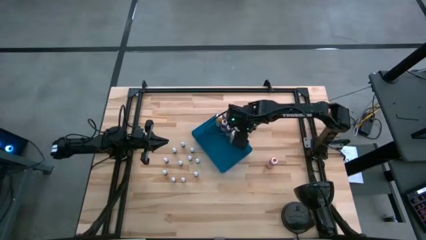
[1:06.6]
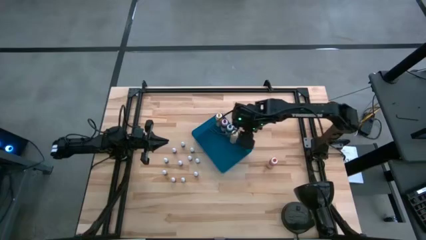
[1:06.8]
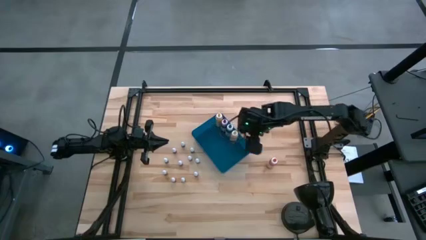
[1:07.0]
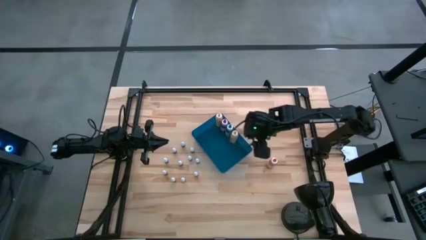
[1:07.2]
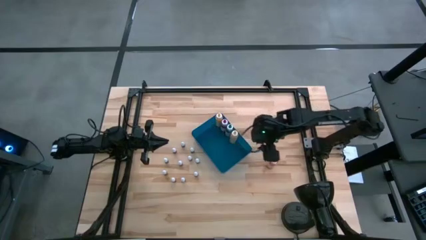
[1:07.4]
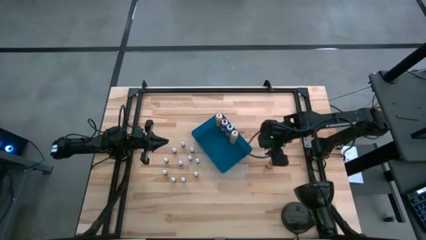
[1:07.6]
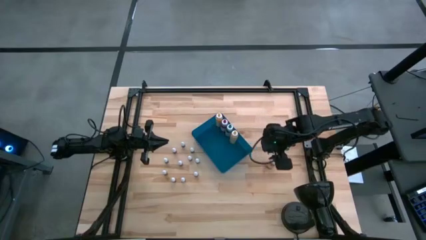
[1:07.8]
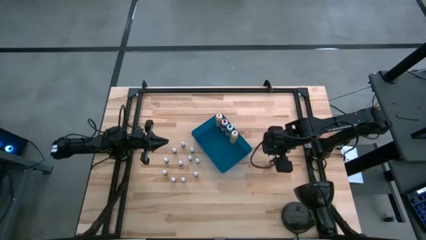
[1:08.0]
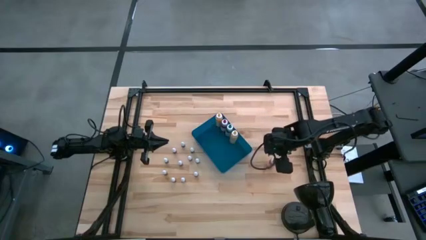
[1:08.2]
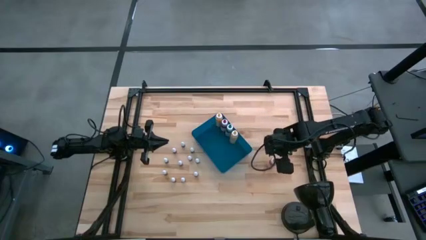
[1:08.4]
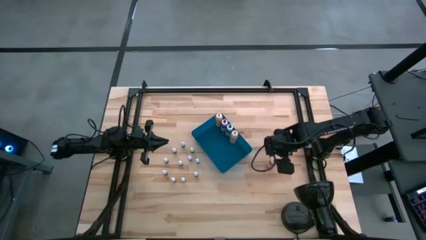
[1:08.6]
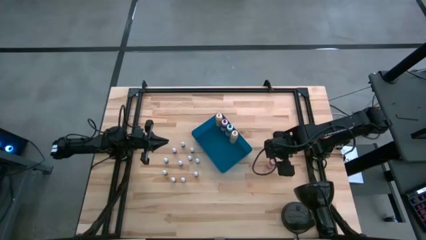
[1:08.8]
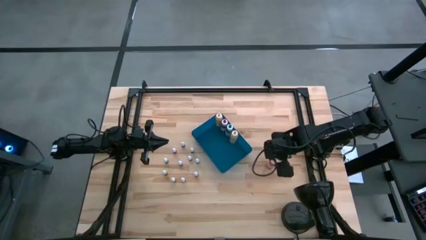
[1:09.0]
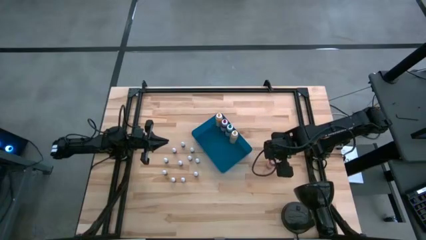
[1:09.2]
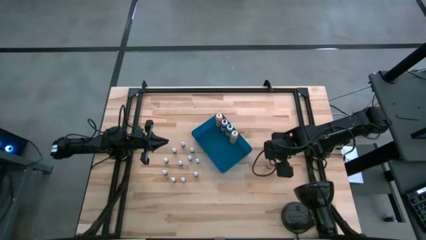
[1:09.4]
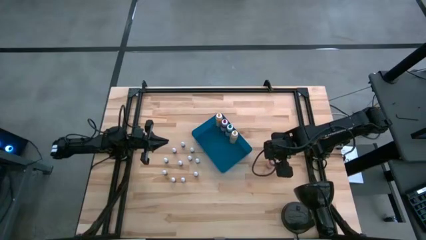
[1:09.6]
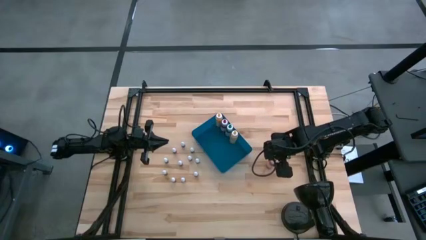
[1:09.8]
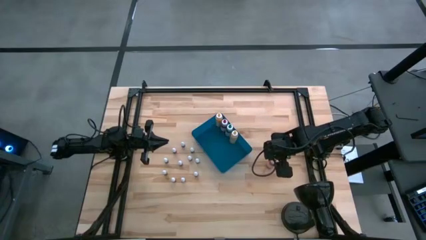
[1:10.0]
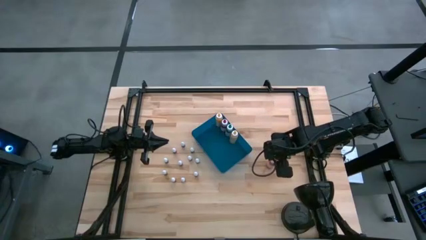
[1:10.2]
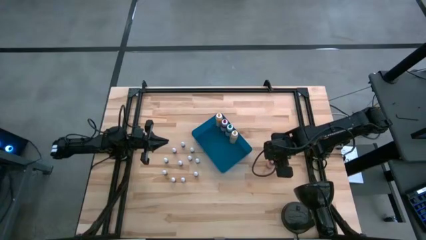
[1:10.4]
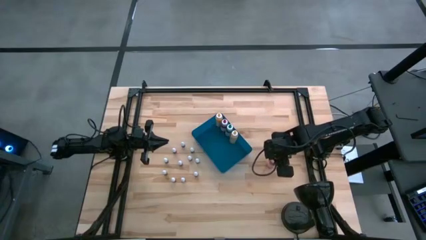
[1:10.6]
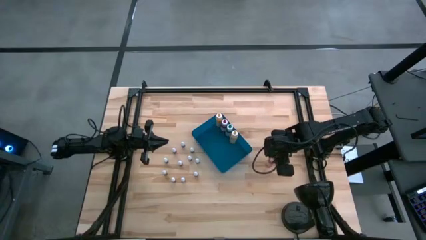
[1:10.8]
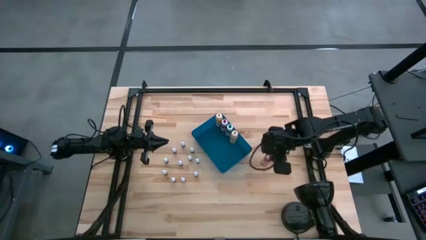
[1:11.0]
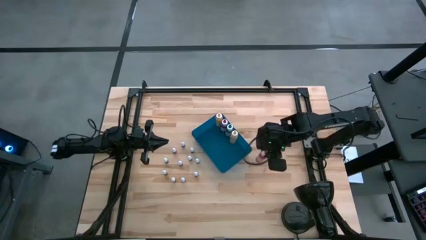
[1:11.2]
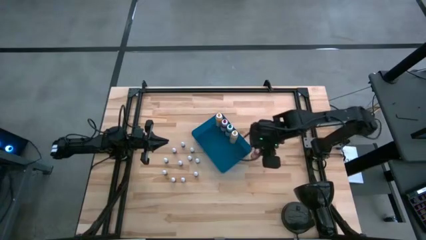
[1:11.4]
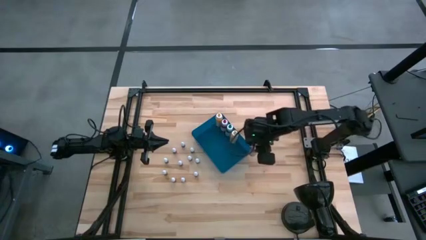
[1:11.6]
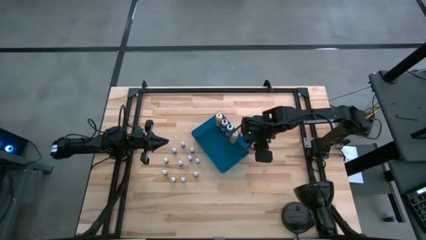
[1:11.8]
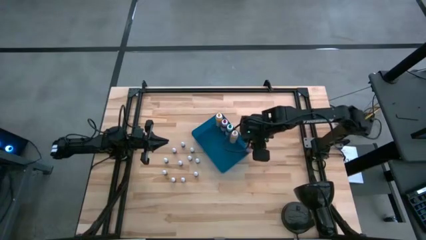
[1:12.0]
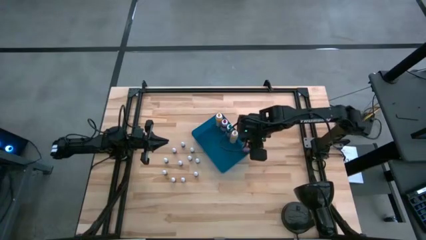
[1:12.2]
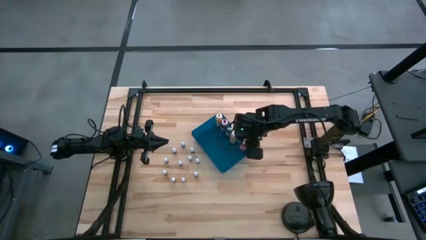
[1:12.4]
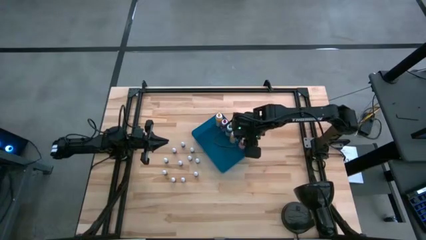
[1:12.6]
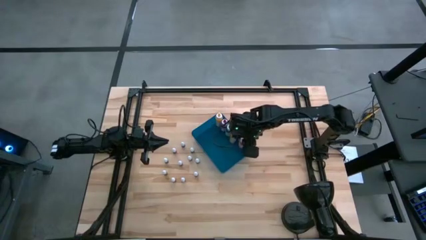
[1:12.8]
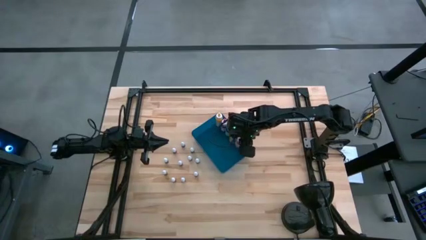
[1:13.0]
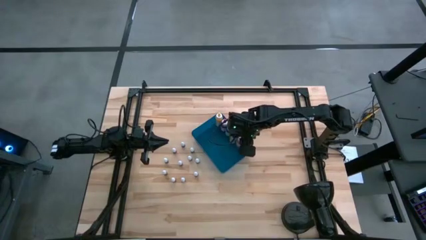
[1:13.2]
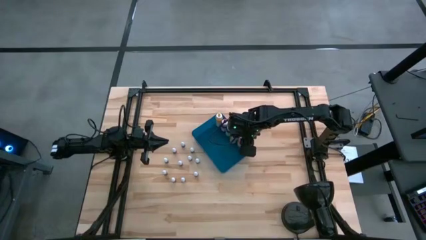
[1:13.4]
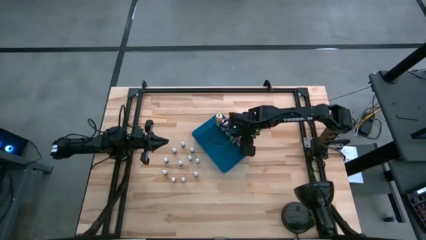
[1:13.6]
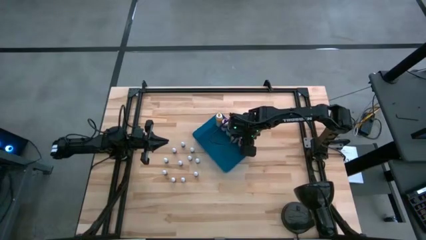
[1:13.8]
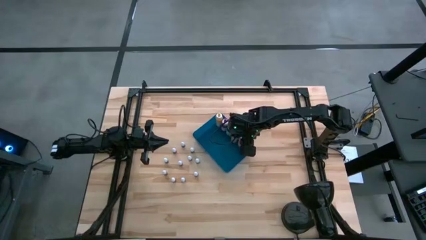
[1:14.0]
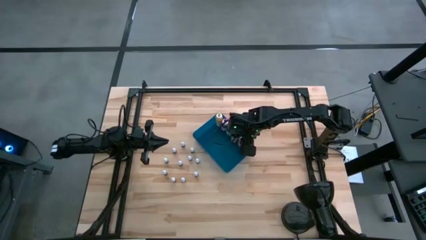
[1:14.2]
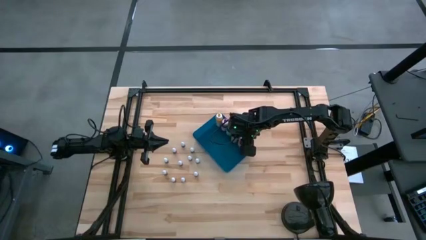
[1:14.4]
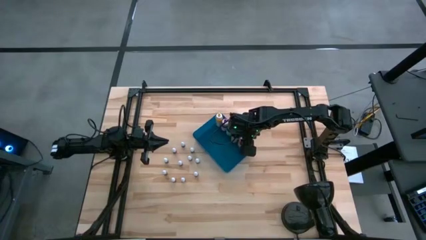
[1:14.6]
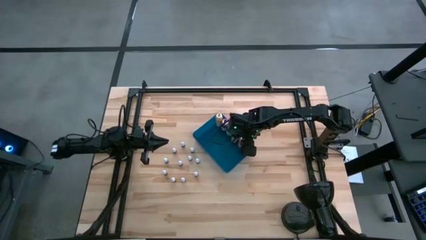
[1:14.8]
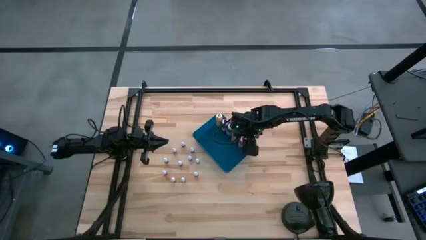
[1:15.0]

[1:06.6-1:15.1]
Task: Pick & Place food coloring
Put the orange food coloring bottle into the blue bin

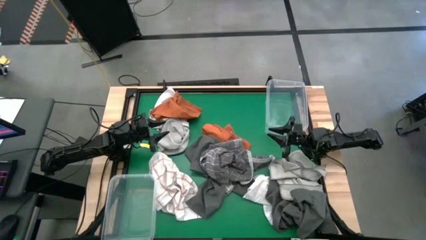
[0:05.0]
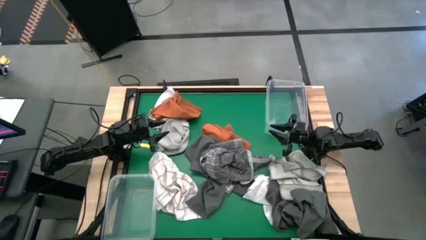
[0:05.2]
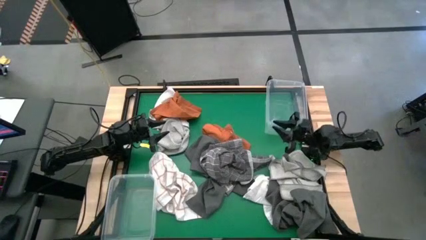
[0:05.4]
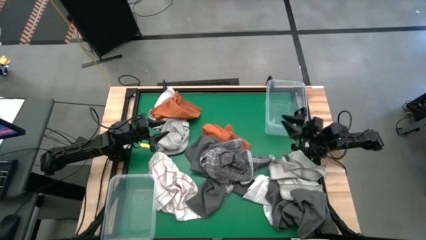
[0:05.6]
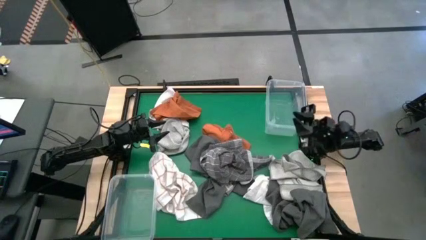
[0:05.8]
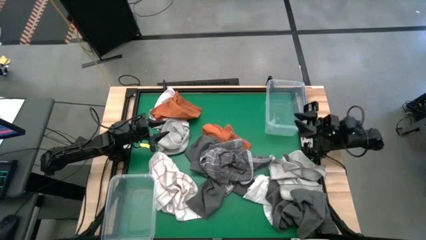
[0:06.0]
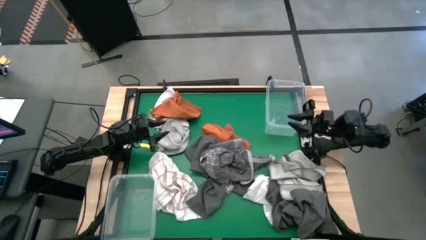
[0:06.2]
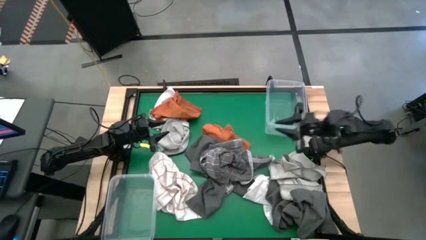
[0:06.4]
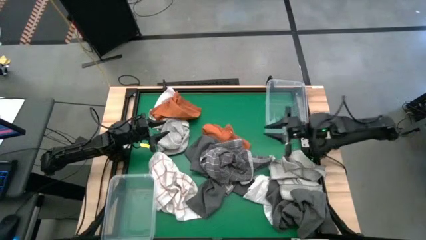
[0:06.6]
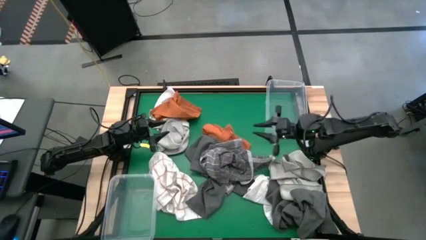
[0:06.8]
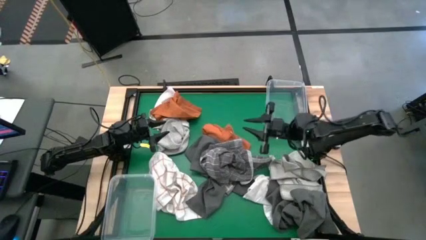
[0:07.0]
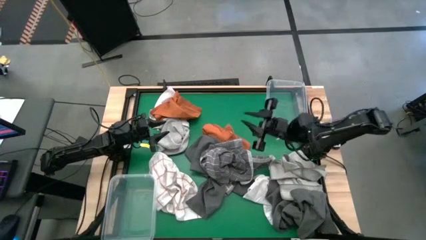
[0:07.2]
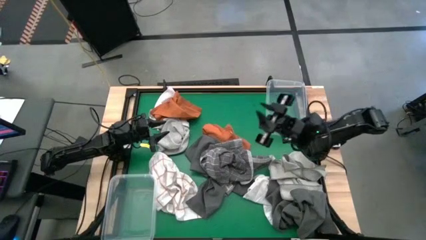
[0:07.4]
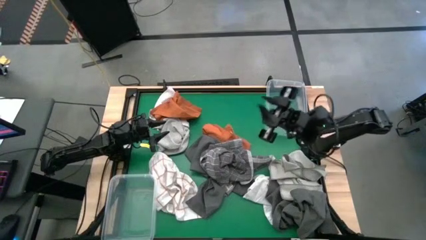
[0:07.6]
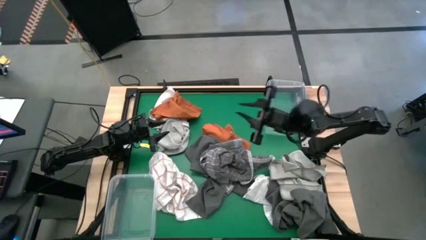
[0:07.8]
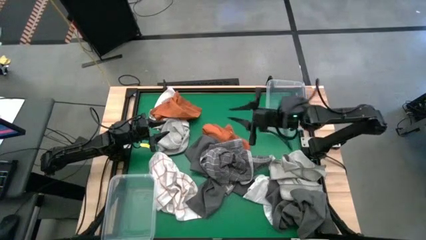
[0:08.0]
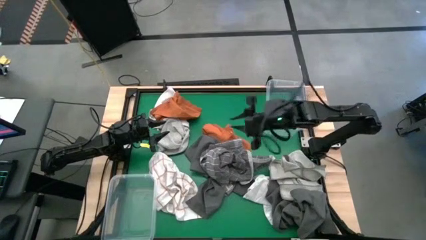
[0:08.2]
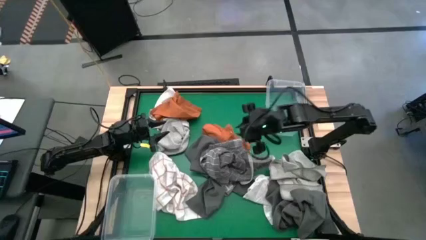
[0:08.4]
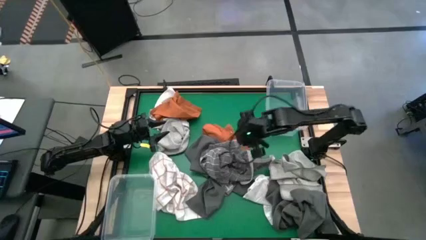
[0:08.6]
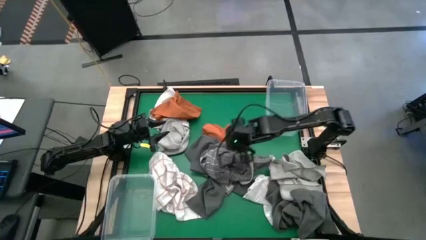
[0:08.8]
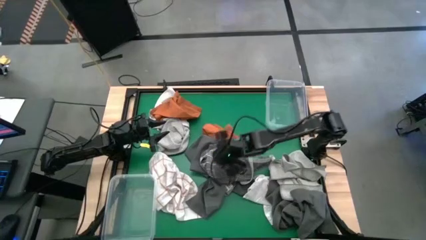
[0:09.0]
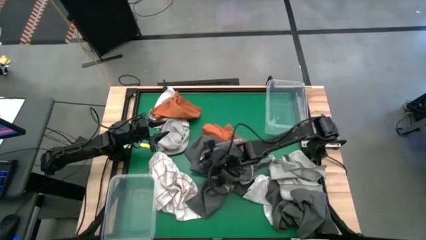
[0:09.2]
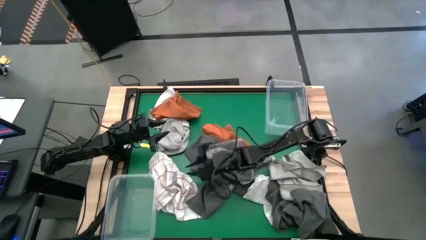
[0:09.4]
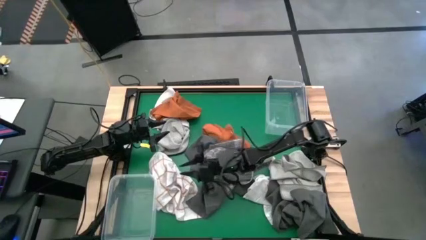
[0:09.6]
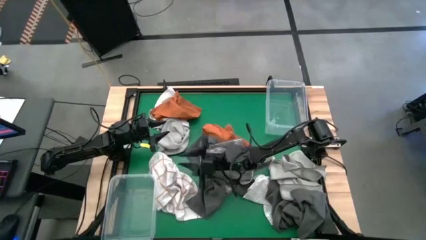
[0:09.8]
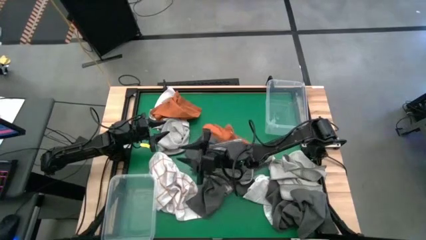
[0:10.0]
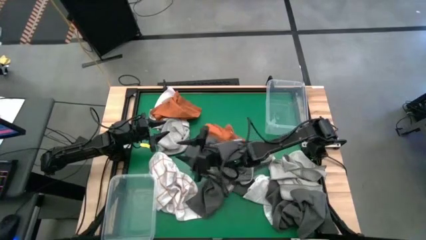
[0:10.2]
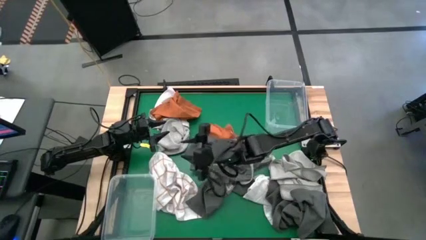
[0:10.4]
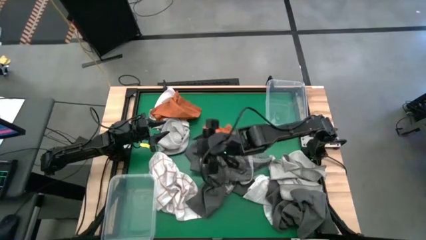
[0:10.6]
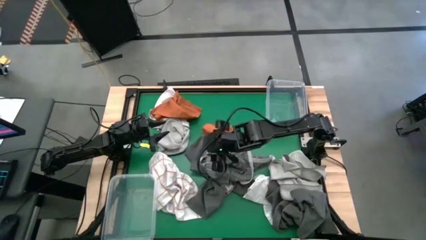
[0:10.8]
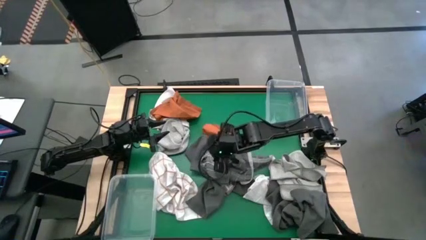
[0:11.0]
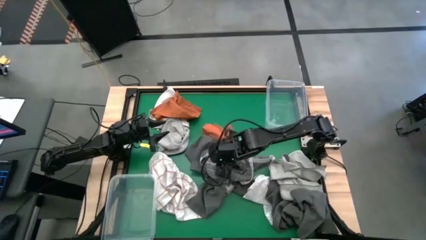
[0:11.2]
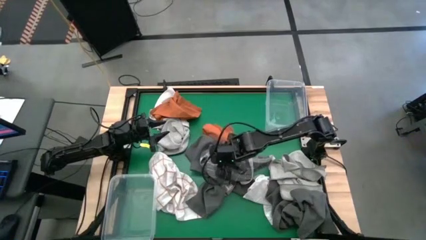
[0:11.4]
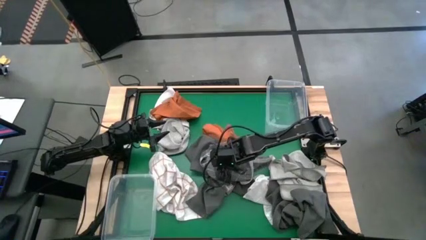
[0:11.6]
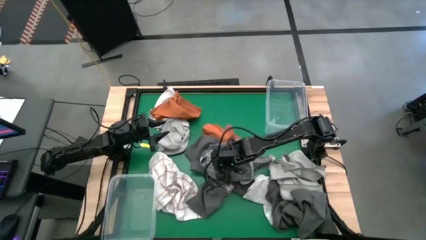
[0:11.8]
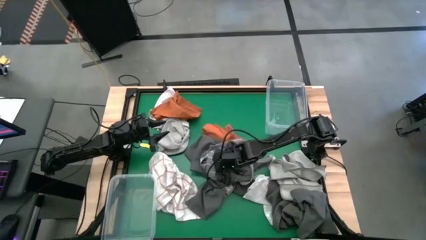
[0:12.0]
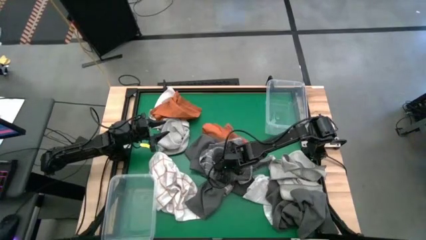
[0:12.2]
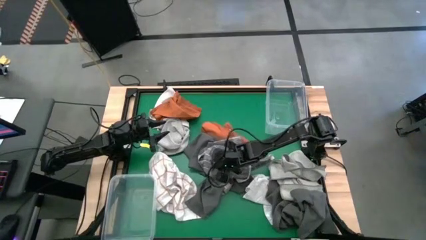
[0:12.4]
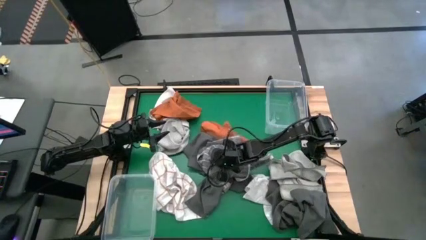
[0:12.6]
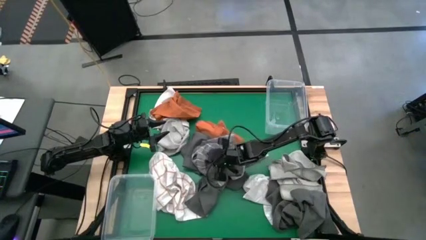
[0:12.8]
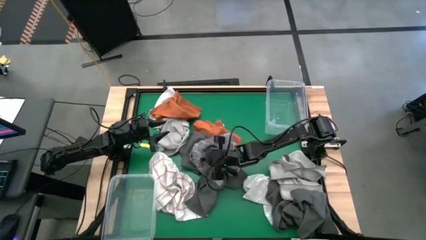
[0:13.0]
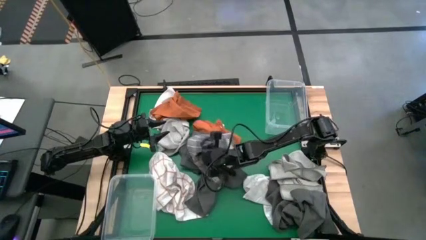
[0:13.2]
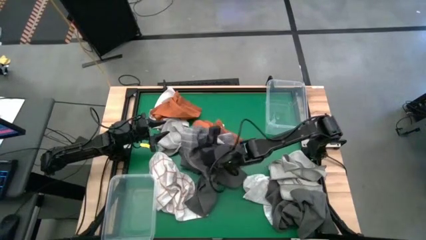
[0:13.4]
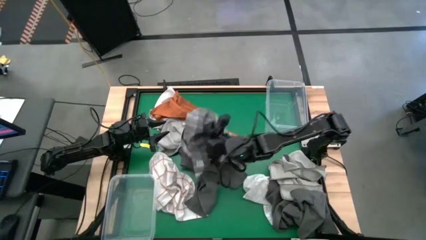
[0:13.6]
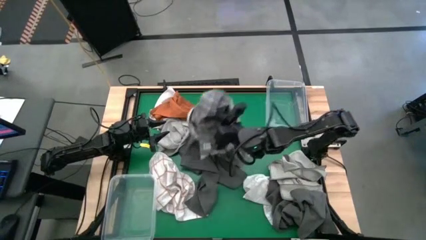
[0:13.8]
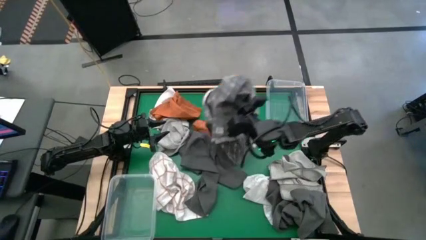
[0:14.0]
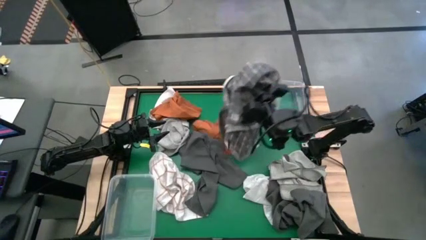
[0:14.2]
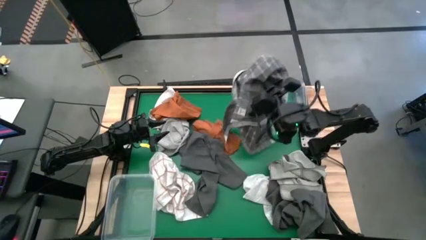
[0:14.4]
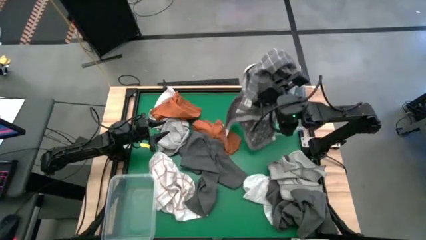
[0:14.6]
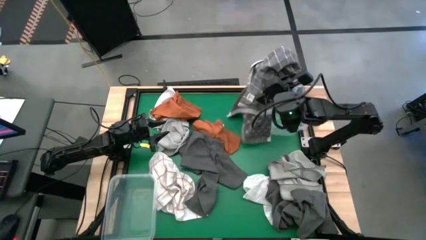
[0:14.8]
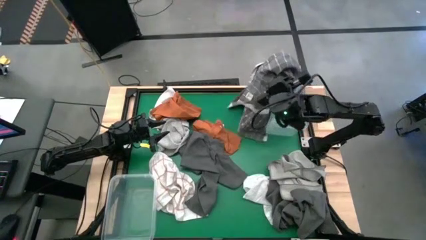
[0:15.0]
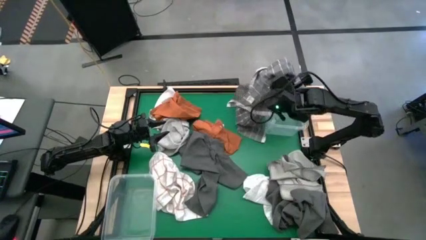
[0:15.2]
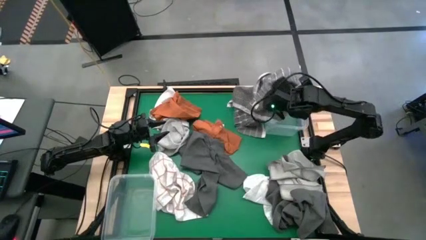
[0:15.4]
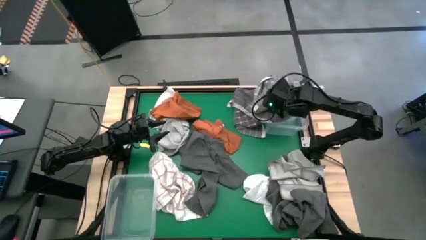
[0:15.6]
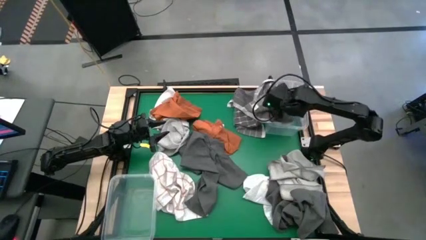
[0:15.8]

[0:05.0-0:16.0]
Task: Sort towels by color in basket
Put the dark gray striped microfiber towel into the top transparent bin
